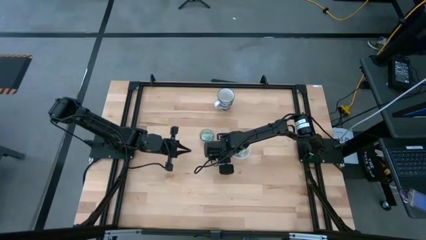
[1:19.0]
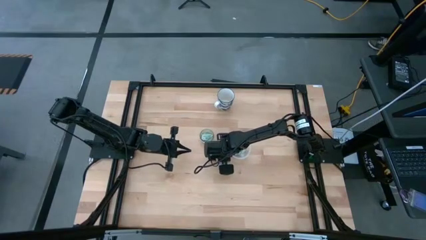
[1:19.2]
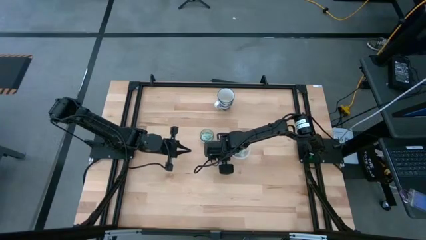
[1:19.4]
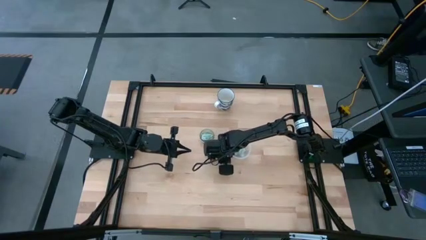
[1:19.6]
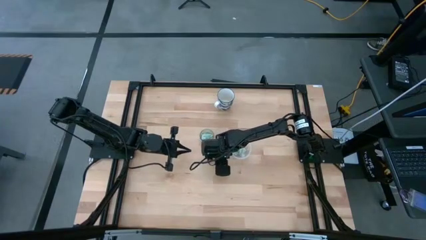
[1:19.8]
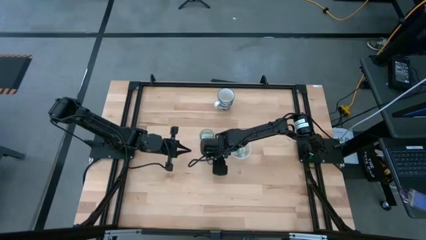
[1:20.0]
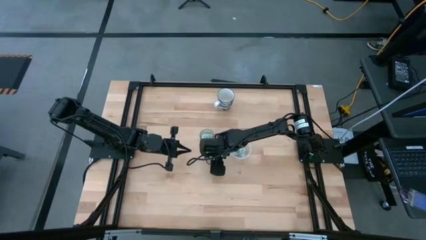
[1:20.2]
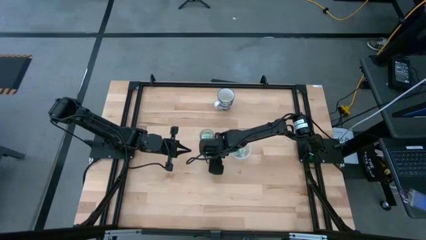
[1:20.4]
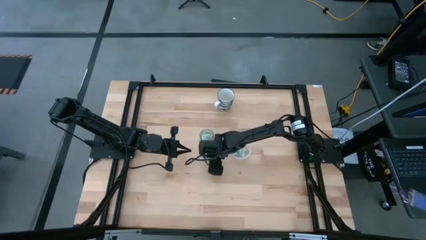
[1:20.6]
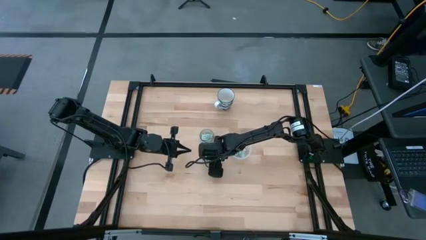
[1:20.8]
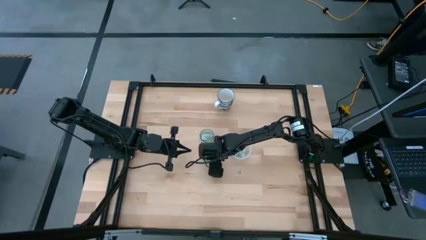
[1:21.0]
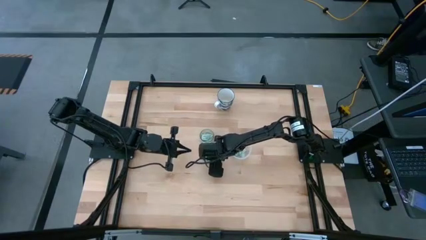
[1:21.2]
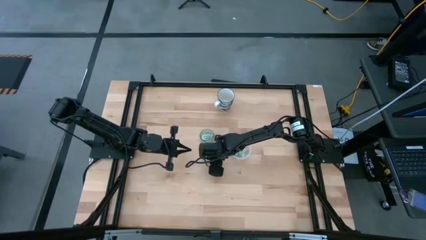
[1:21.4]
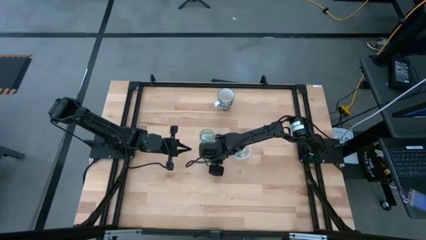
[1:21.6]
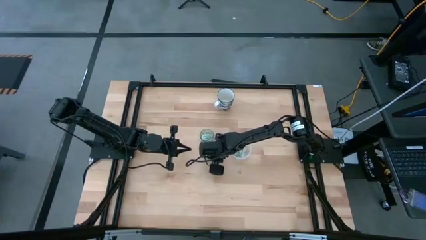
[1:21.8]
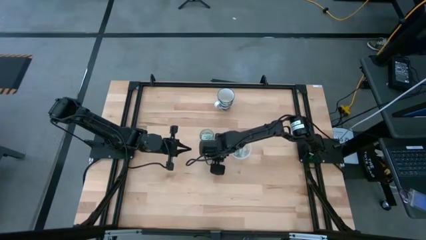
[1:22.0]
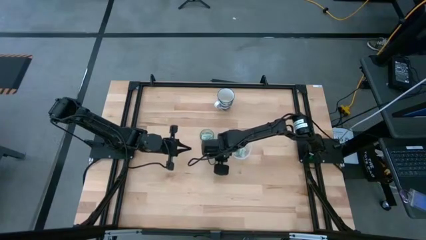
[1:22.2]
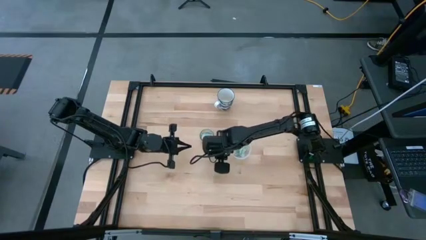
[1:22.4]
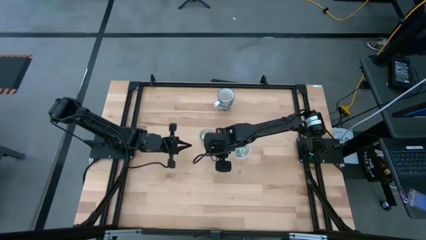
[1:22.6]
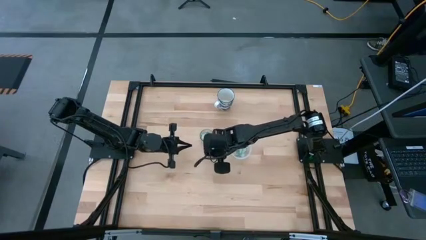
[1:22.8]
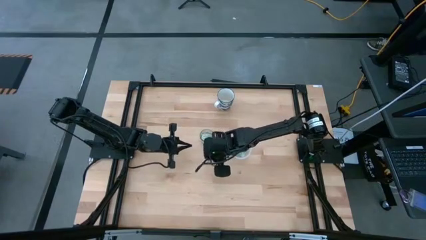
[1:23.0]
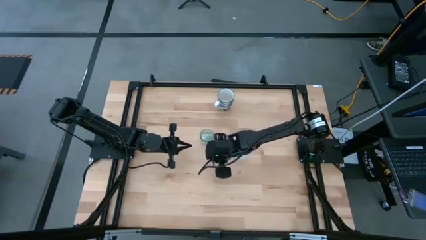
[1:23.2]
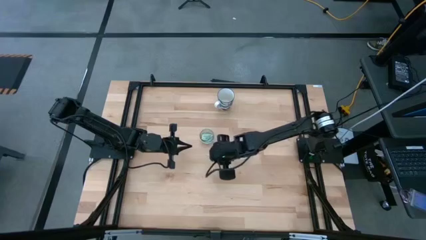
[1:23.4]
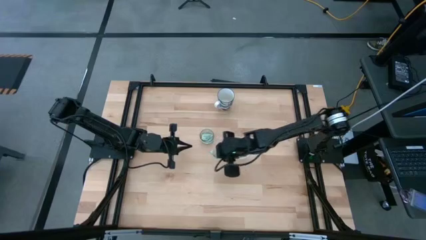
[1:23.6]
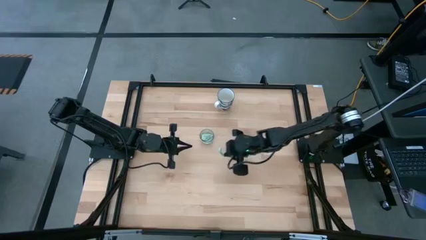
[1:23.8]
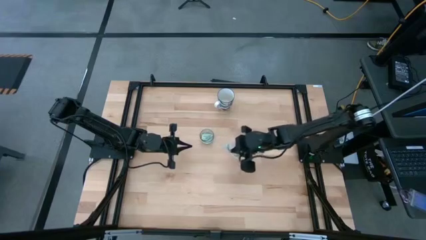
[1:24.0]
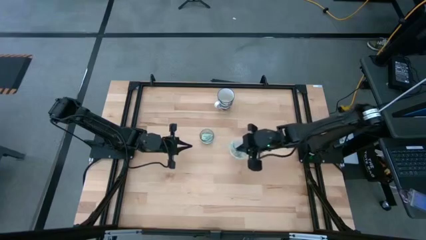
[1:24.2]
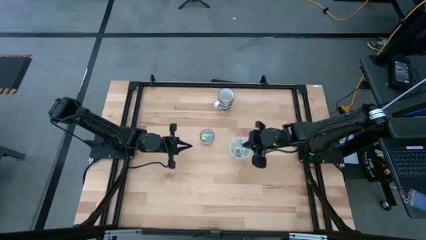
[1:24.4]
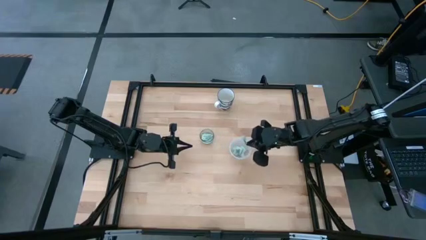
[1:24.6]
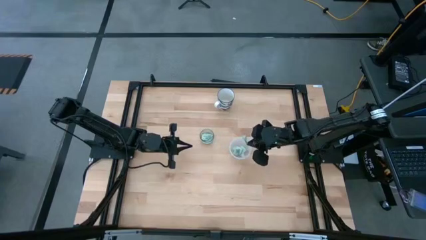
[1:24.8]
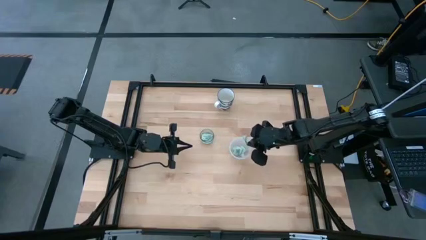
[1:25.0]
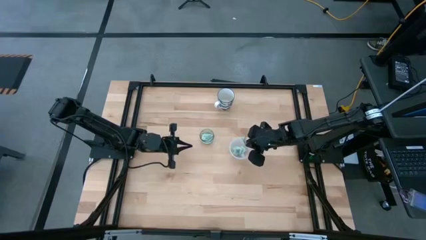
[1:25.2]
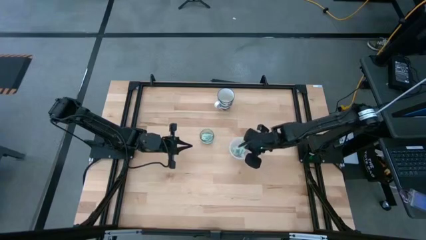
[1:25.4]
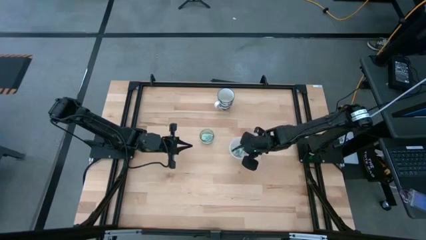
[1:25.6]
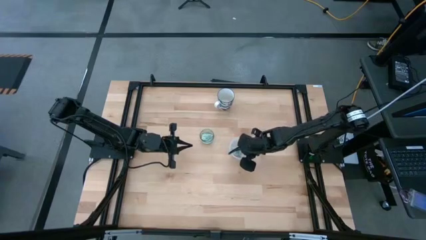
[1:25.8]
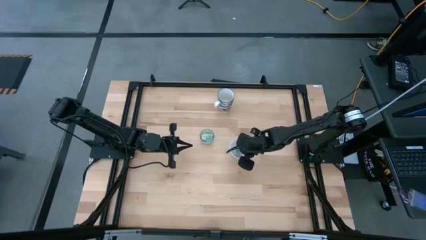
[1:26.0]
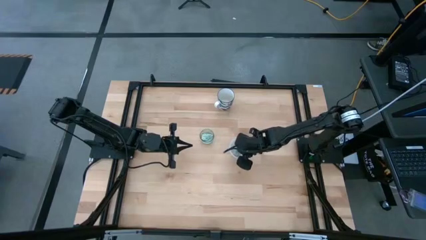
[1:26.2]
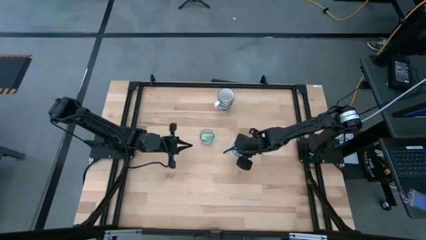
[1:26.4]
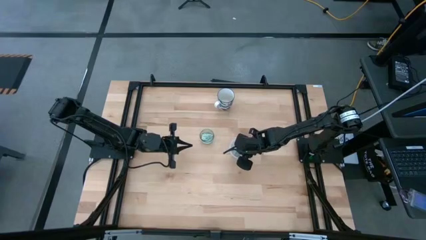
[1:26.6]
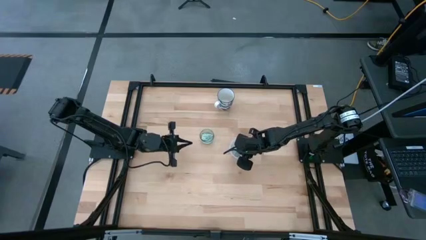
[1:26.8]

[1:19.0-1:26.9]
Task: Pick and place Stevia / Truvia into bins
Put the stevia packet into the transparent container

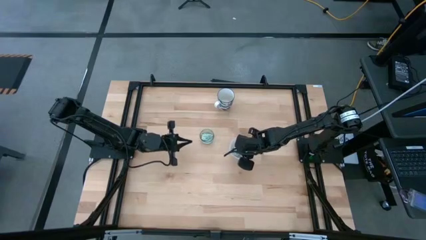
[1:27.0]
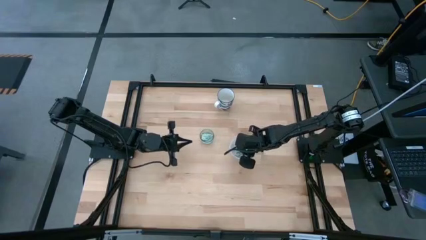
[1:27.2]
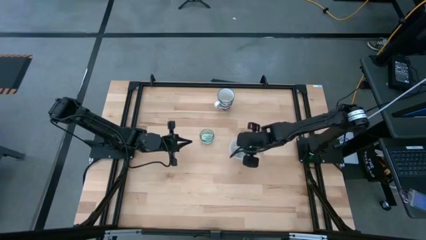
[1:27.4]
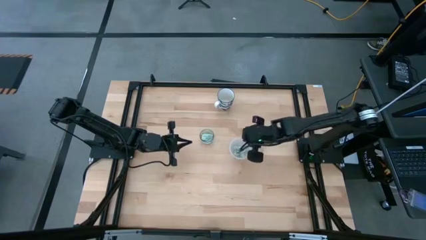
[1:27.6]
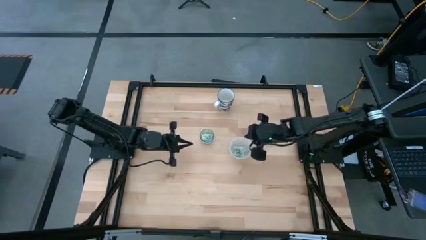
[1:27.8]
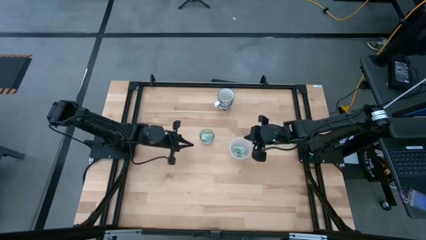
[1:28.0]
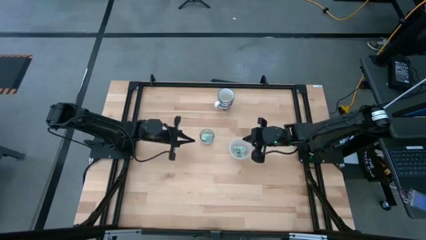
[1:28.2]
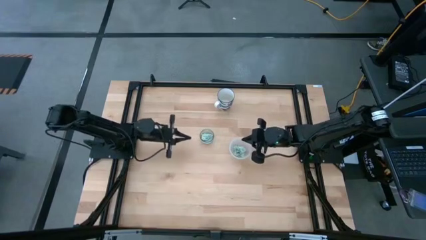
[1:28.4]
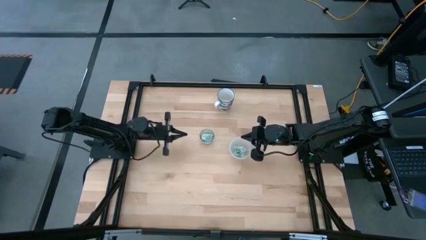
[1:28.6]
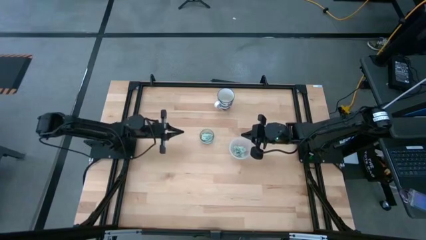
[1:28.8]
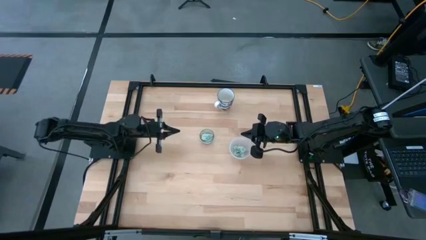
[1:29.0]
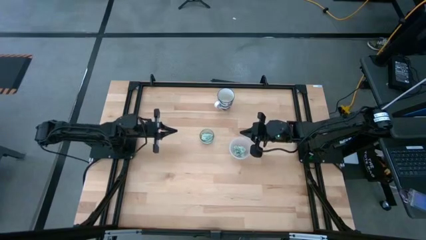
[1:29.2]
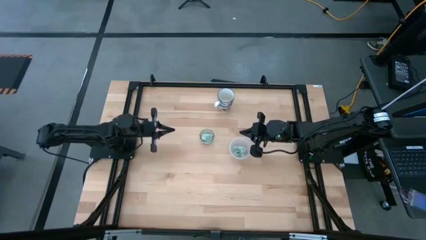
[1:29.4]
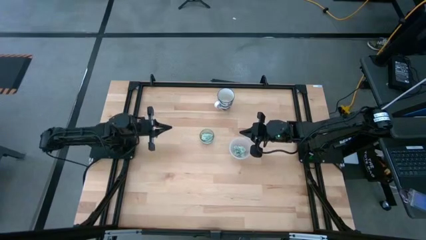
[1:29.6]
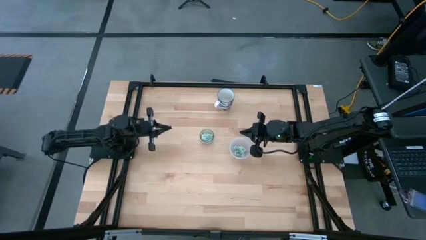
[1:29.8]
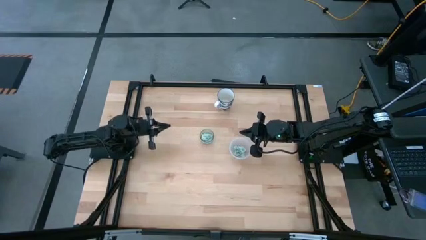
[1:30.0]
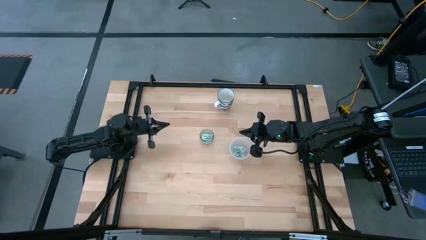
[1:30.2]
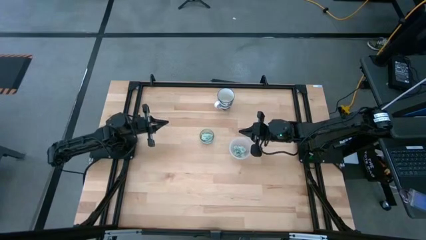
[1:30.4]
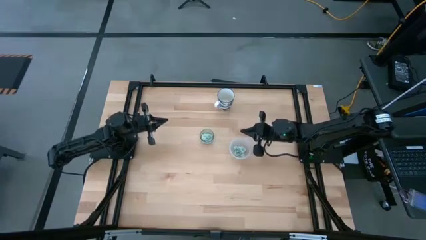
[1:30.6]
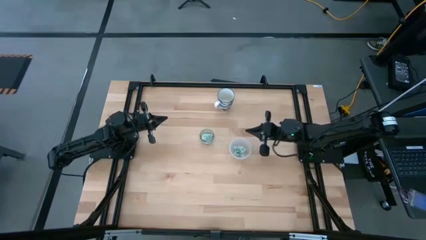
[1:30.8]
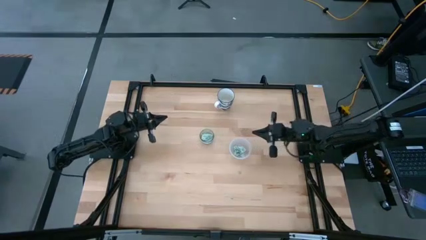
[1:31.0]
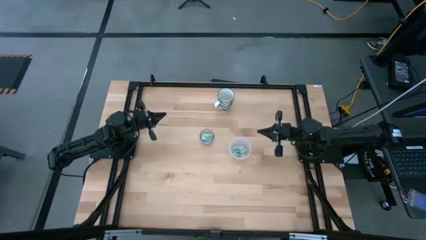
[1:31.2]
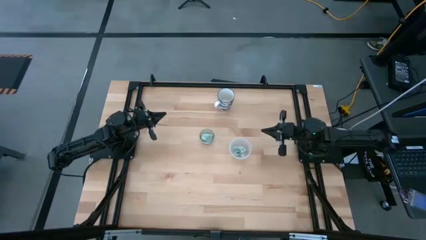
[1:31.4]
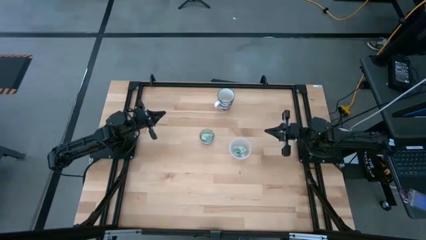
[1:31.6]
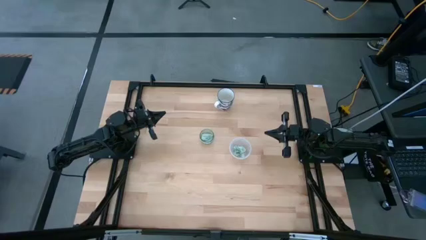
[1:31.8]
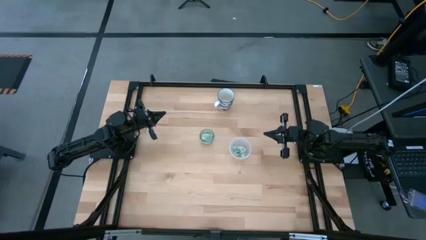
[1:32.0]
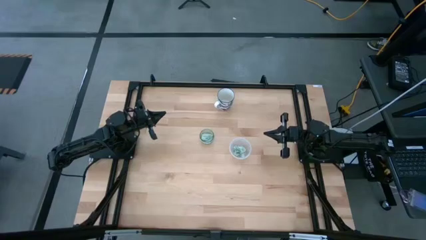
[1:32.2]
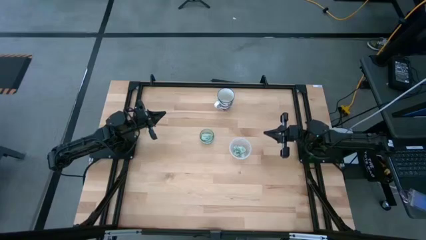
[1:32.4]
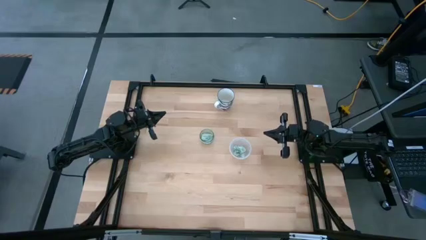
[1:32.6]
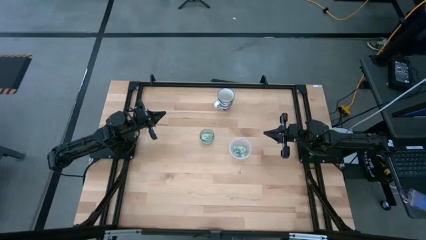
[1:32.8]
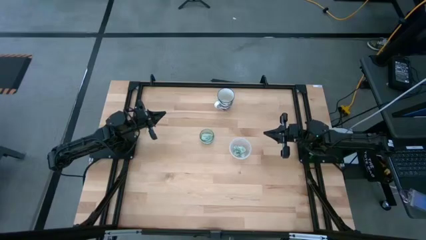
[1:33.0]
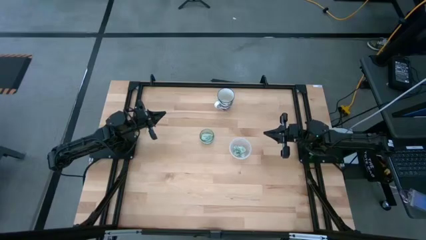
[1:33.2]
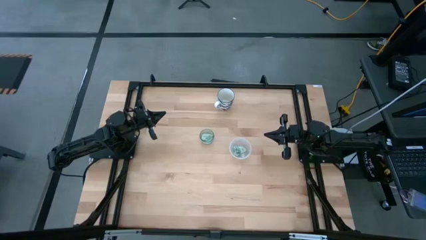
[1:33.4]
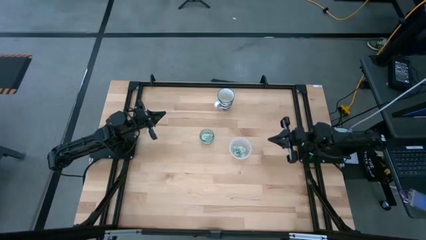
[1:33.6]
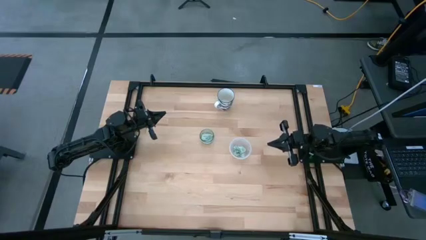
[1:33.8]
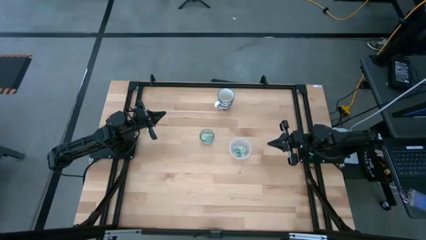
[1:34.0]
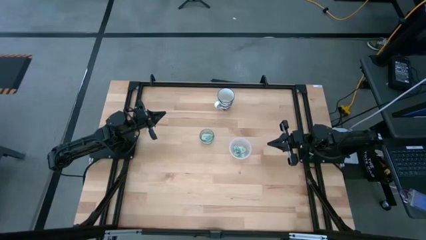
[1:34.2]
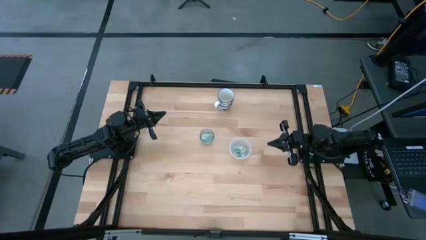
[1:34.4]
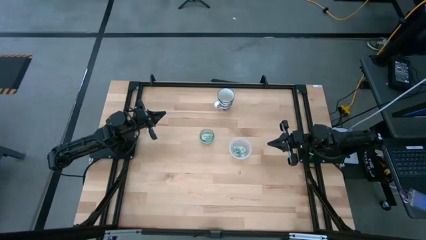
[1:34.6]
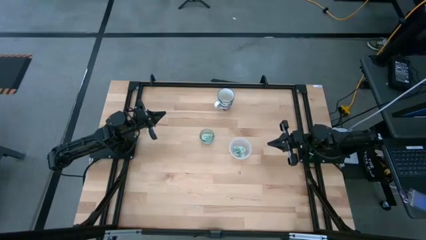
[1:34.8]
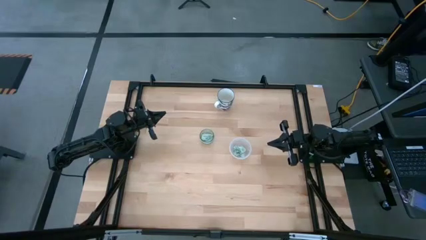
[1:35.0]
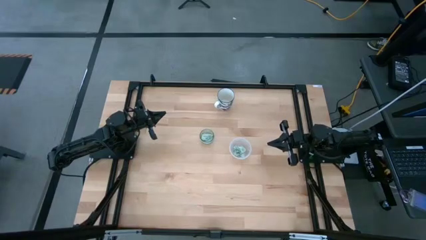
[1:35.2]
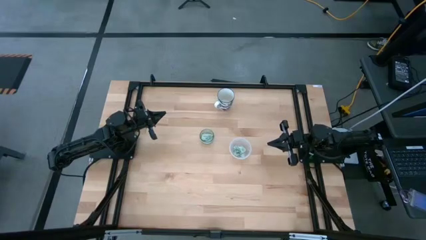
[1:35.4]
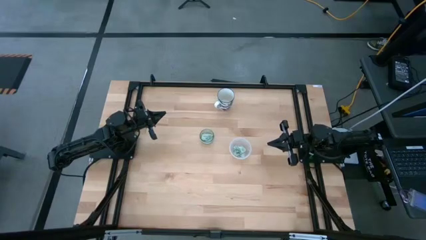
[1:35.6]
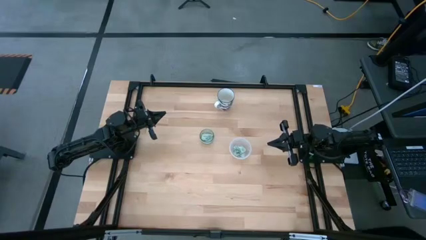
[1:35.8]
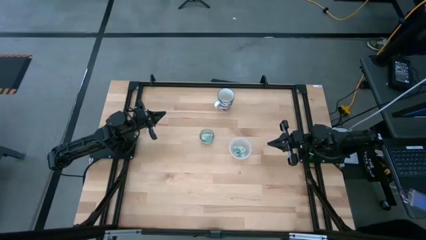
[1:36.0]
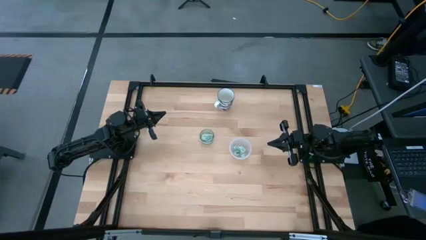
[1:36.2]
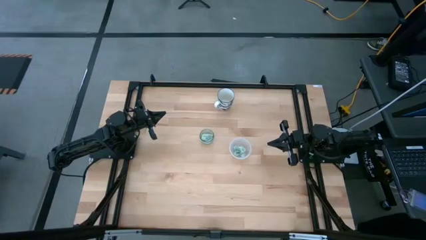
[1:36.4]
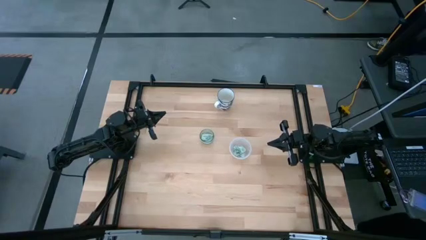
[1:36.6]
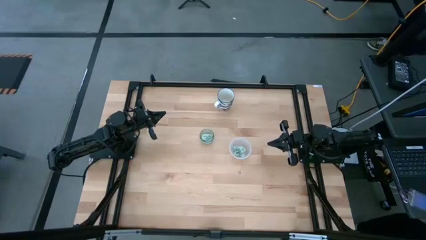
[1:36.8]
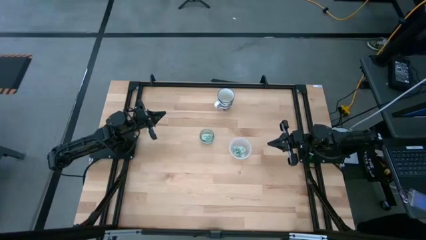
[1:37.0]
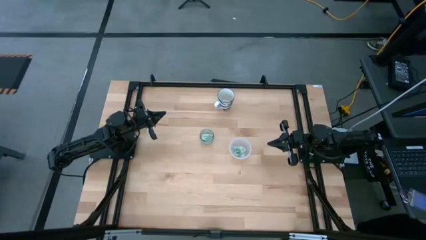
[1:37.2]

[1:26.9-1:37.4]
Return to Home Position
